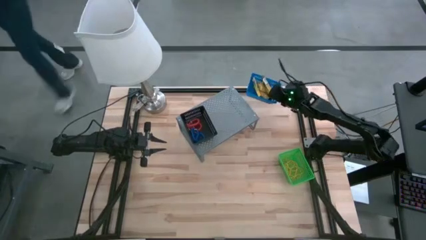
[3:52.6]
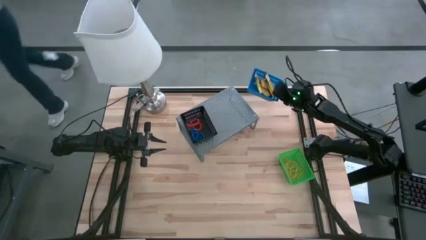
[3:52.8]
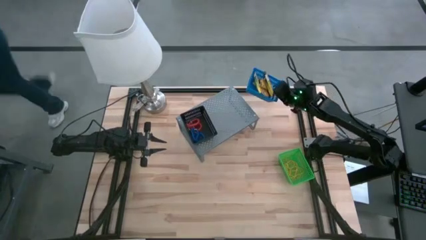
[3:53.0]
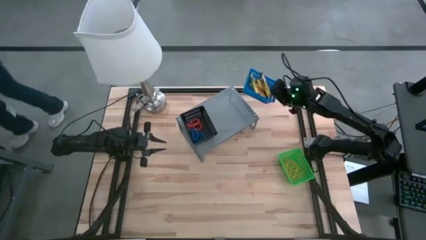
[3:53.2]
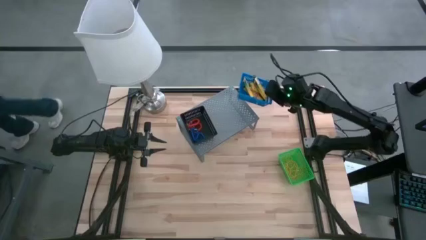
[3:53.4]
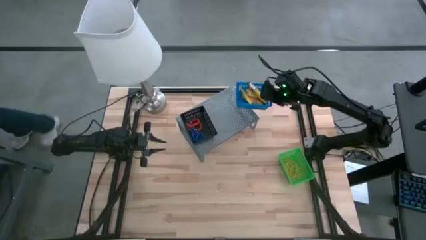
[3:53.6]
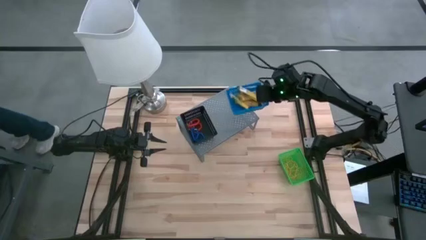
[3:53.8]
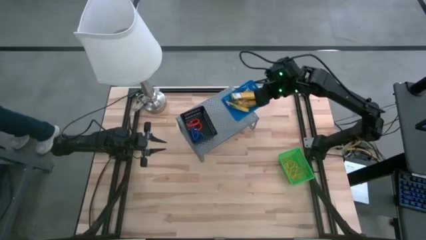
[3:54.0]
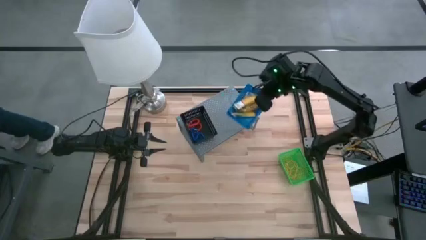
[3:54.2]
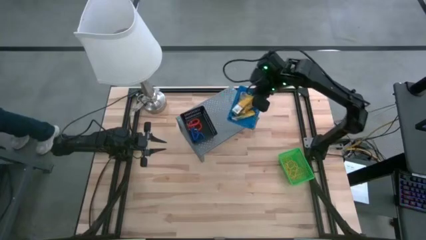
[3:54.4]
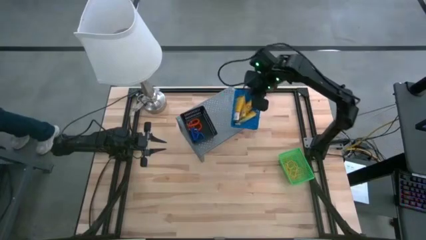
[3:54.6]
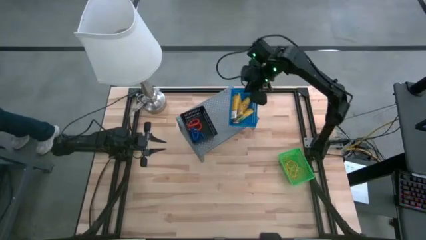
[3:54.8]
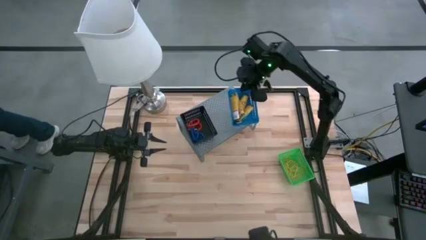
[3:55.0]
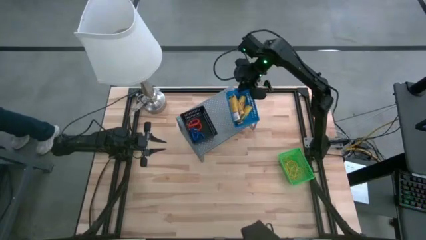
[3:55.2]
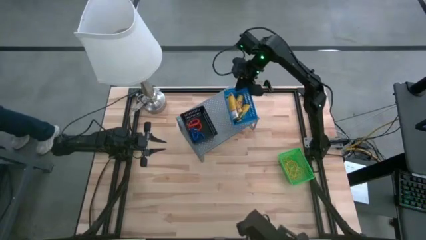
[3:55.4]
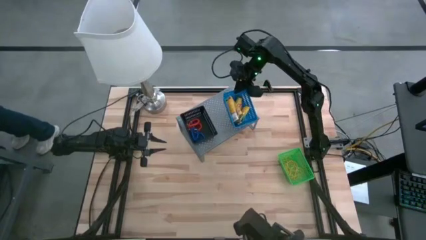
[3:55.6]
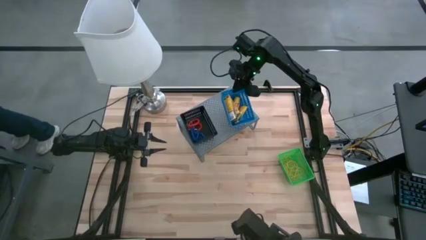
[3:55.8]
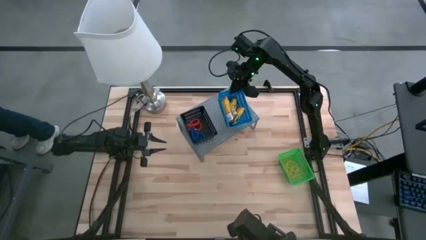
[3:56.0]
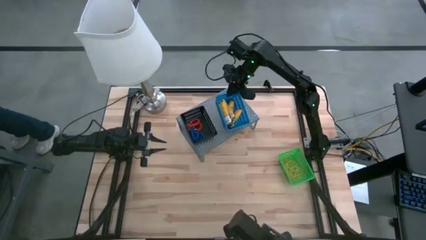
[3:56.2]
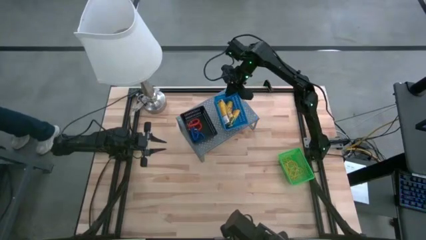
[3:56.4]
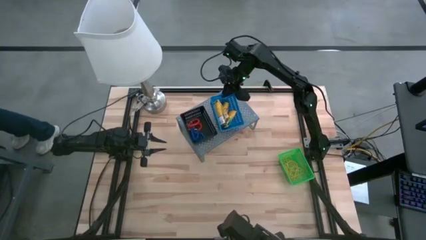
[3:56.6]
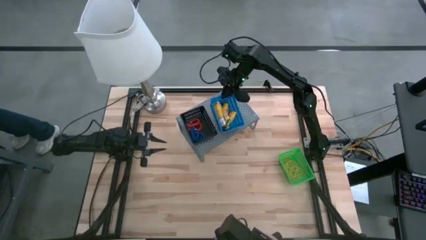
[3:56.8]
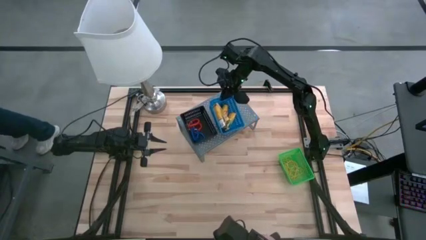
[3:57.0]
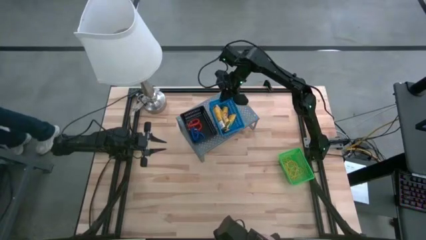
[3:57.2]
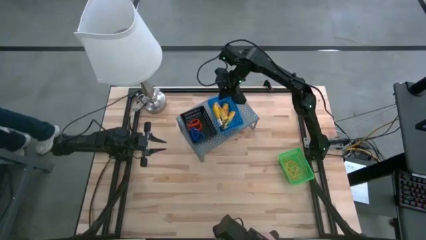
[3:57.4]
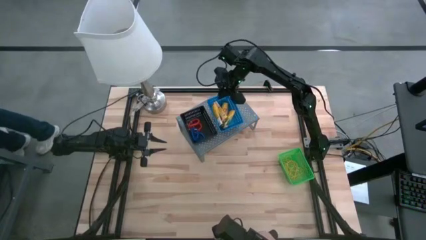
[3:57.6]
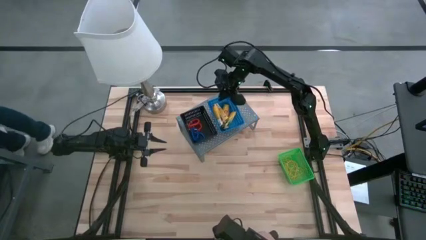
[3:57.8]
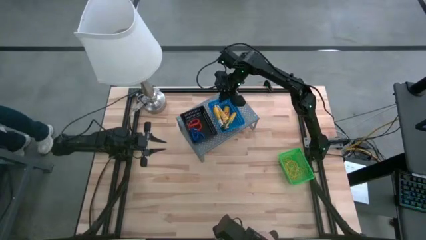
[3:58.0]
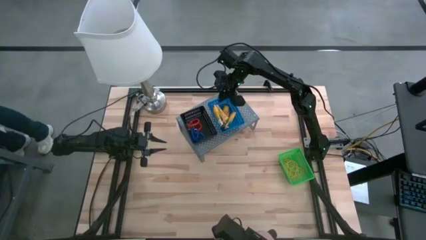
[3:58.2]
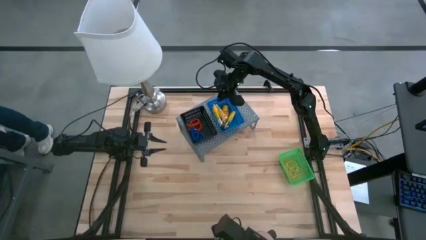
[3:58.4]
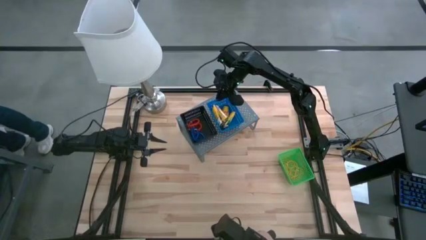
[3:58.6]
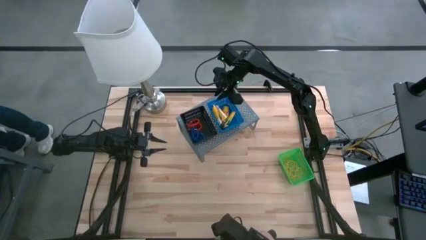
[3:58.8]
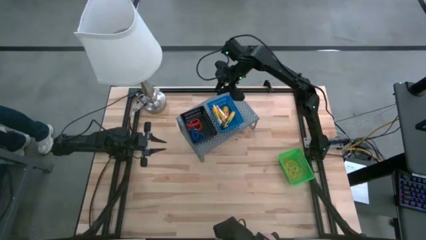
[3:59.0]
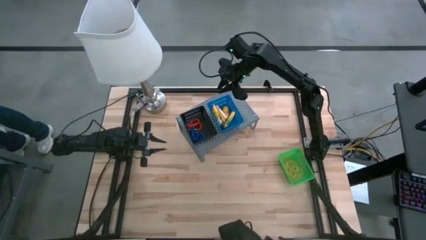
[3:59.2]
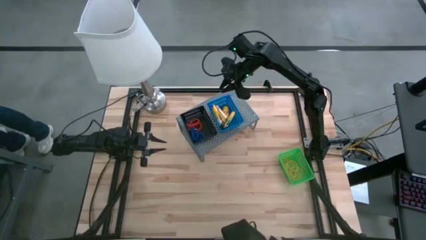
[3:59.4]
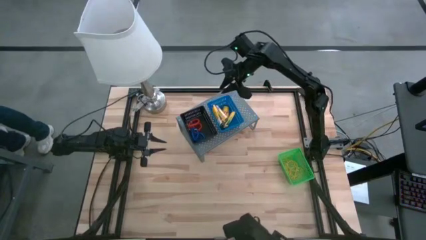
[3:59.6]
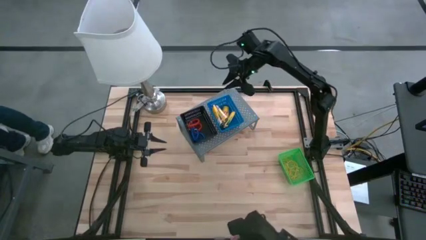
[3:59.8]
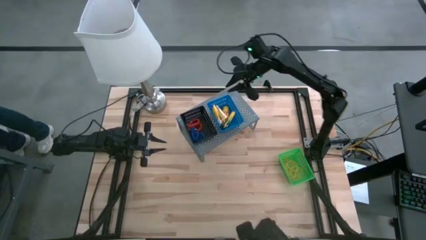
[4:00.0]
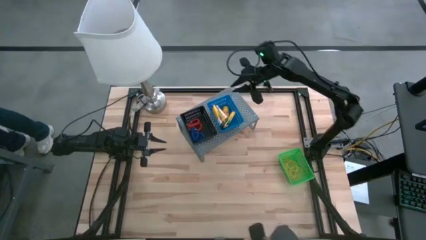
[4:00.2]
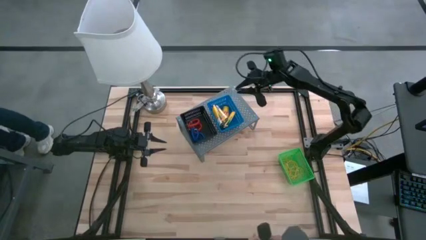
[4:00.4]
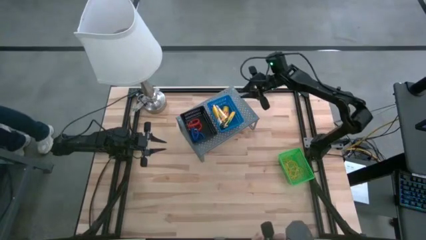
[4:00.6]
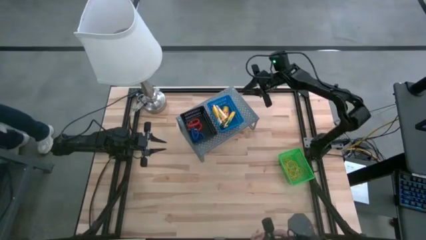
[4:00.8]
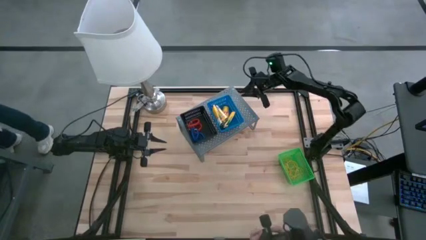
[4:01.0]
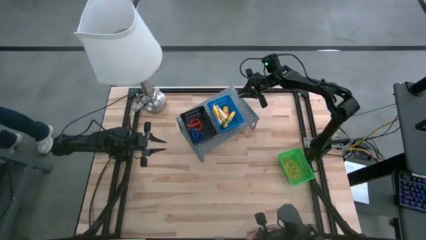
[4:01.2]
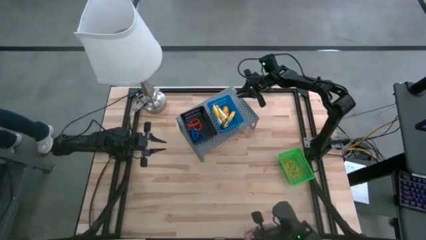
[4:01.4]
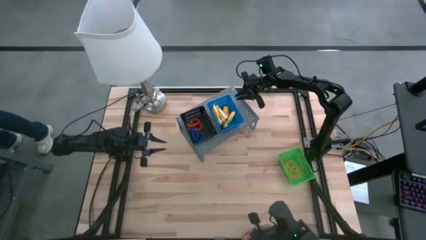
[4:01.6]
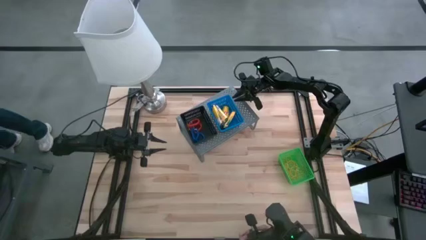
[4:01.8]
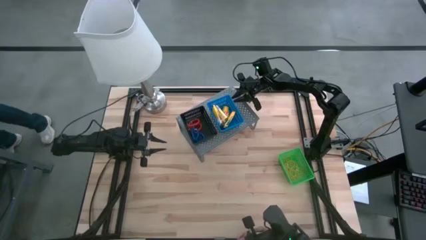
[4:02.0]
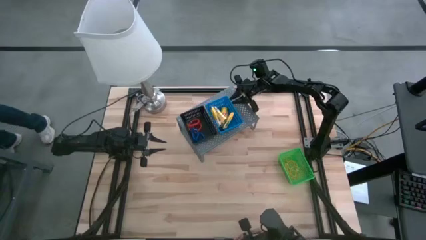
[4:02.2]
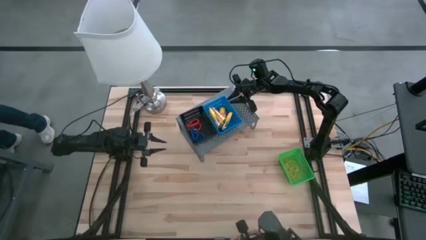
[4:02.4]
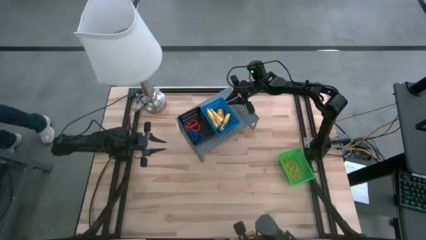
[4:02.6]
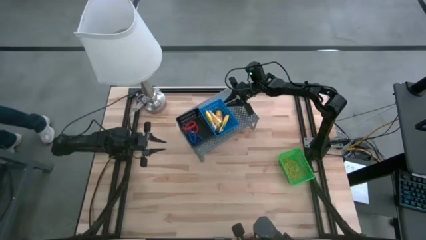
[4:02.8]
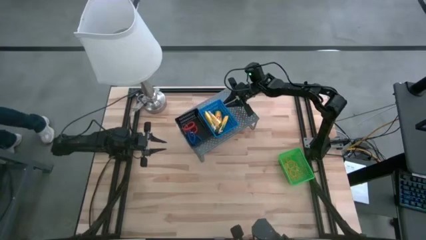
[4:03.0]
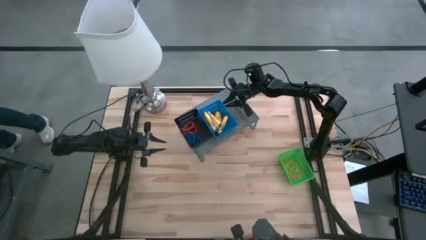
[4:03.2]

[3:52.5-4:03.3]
Task: Pick & Place Office Desk Supplies
Put the blue basket filled with crayon boxes on the shelf
